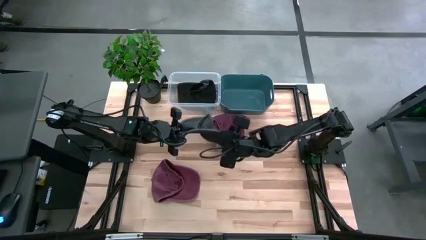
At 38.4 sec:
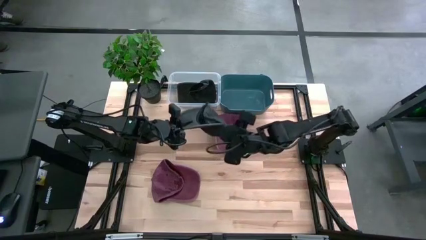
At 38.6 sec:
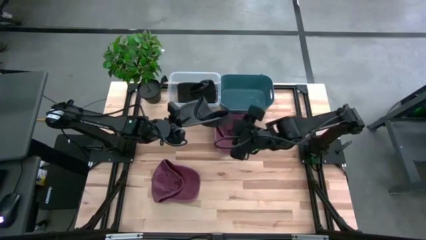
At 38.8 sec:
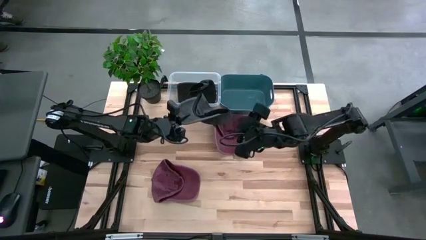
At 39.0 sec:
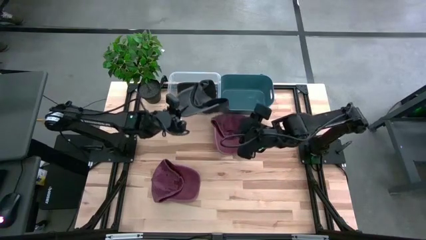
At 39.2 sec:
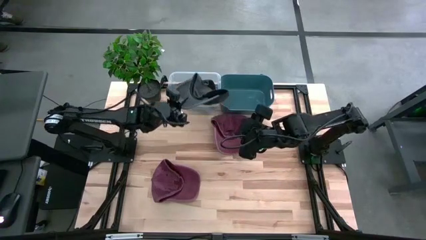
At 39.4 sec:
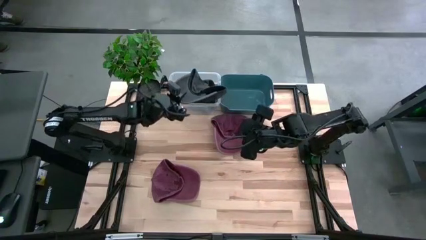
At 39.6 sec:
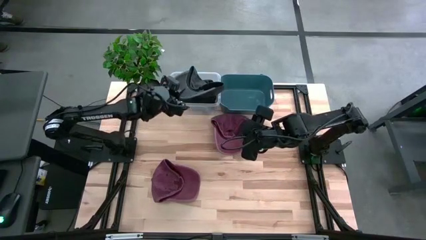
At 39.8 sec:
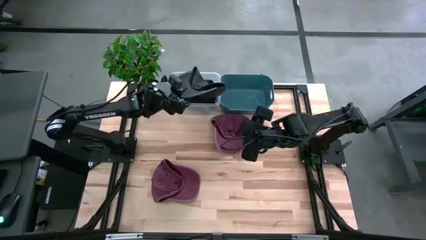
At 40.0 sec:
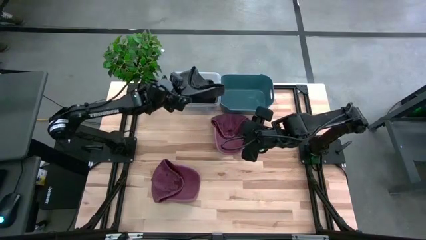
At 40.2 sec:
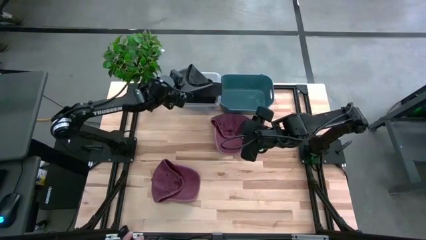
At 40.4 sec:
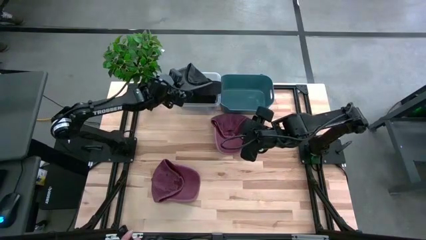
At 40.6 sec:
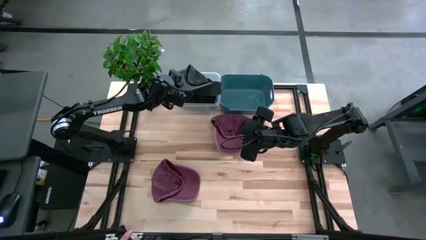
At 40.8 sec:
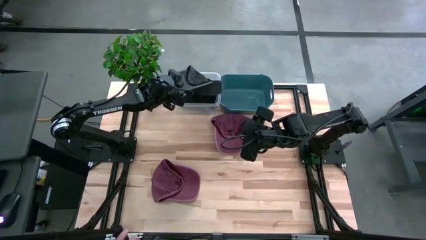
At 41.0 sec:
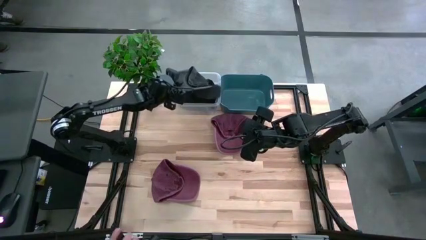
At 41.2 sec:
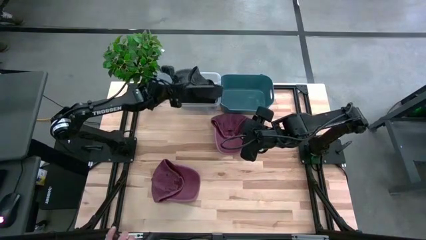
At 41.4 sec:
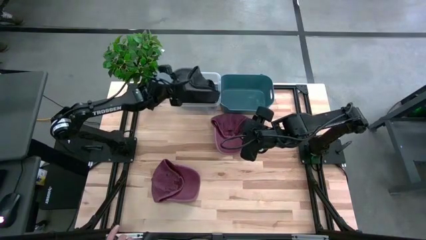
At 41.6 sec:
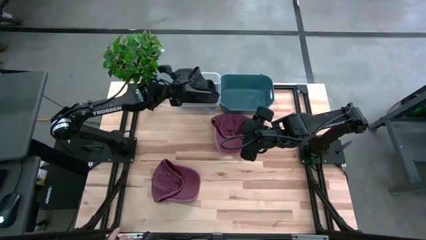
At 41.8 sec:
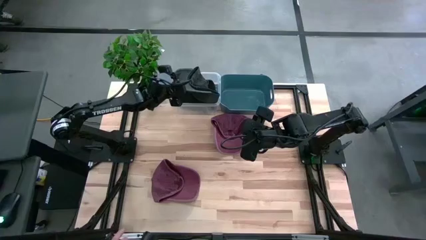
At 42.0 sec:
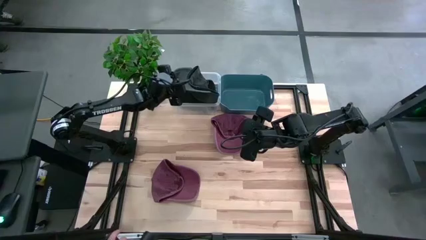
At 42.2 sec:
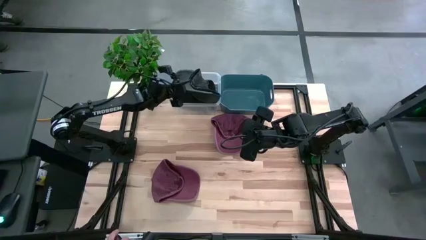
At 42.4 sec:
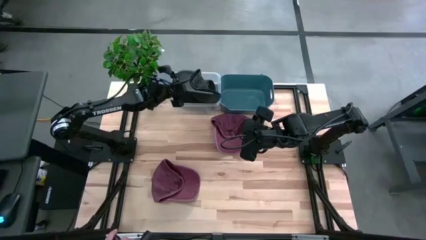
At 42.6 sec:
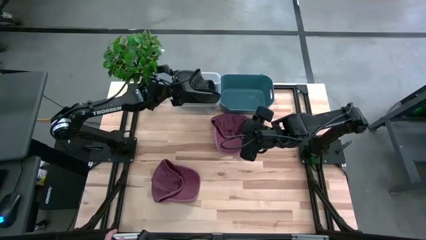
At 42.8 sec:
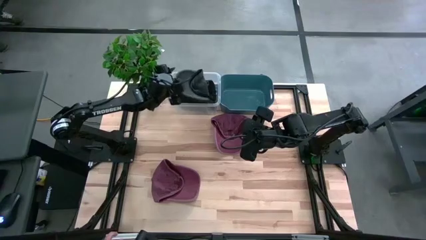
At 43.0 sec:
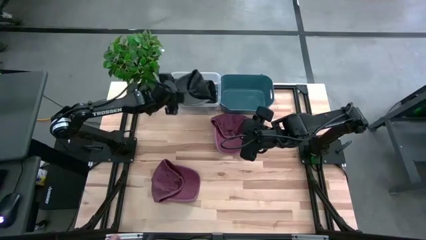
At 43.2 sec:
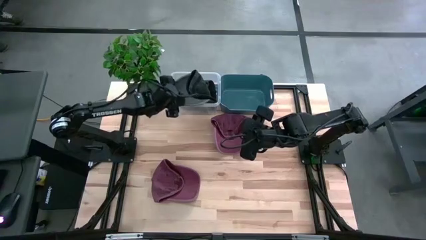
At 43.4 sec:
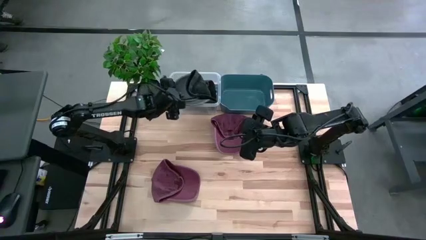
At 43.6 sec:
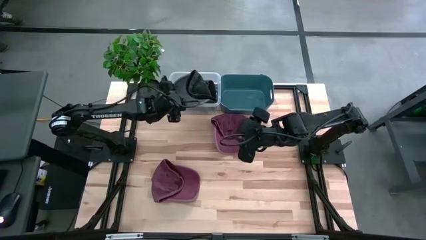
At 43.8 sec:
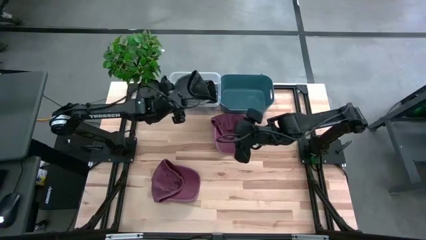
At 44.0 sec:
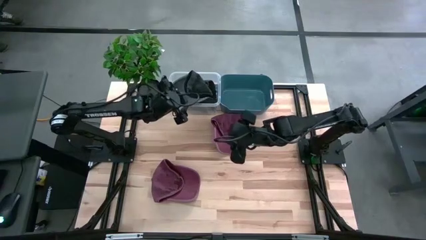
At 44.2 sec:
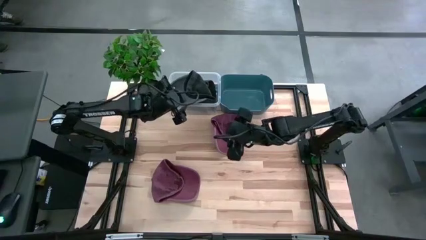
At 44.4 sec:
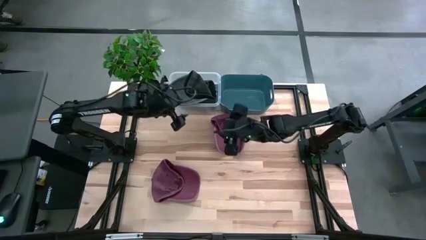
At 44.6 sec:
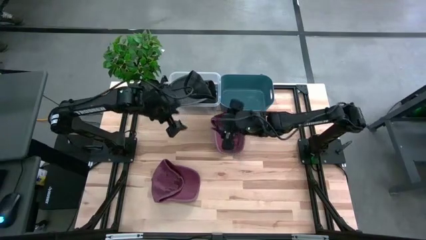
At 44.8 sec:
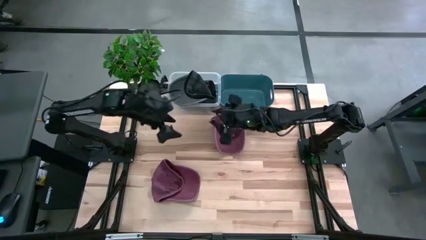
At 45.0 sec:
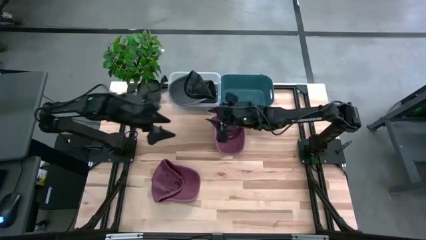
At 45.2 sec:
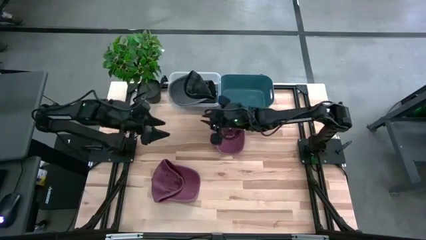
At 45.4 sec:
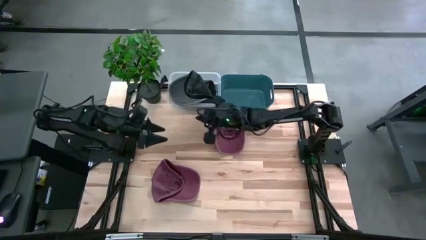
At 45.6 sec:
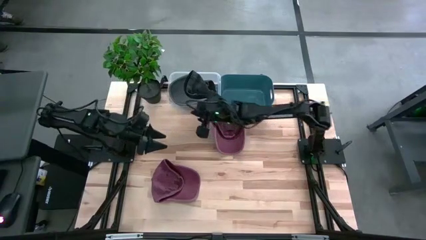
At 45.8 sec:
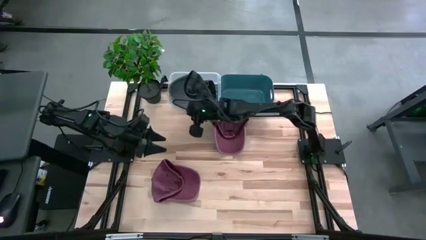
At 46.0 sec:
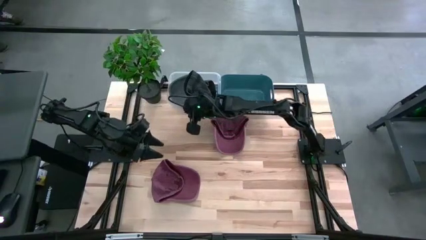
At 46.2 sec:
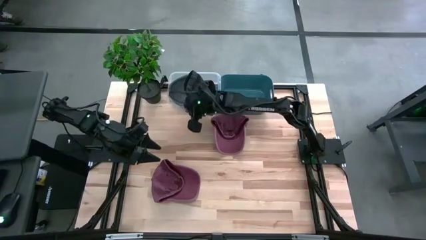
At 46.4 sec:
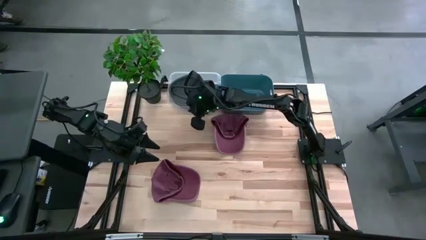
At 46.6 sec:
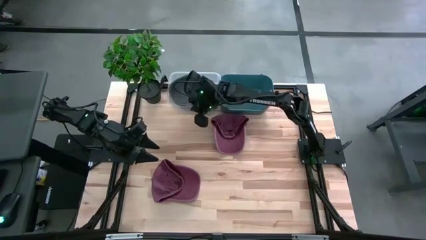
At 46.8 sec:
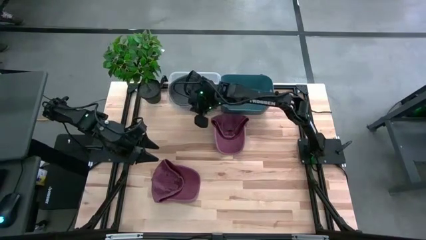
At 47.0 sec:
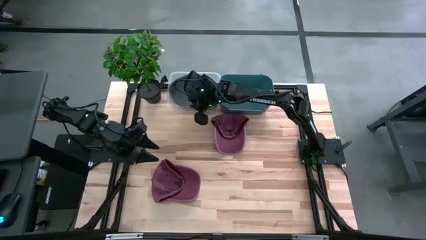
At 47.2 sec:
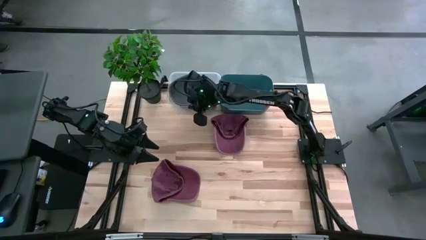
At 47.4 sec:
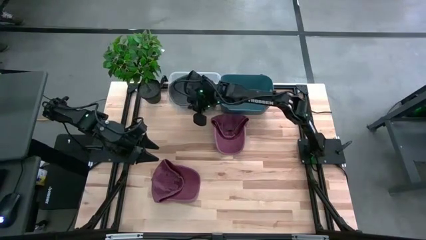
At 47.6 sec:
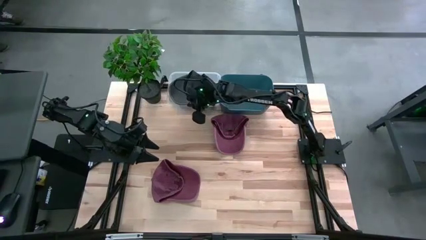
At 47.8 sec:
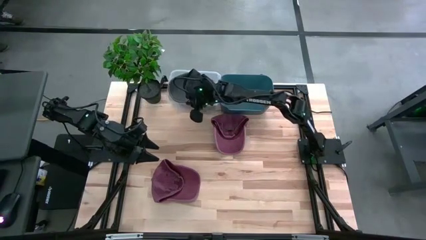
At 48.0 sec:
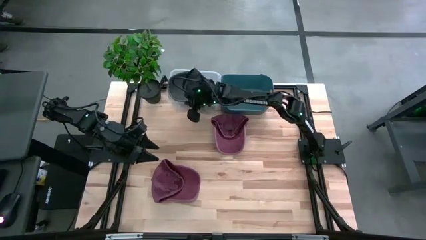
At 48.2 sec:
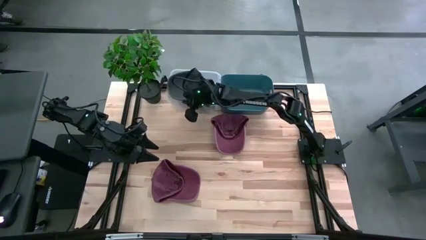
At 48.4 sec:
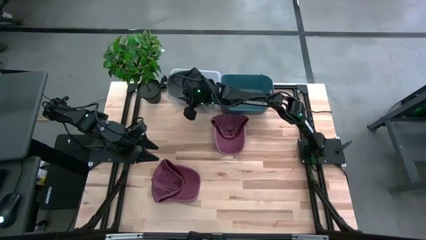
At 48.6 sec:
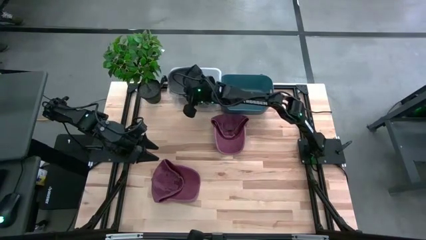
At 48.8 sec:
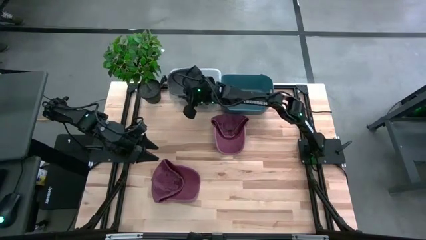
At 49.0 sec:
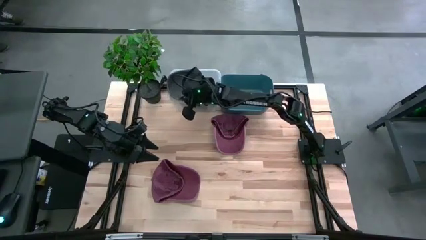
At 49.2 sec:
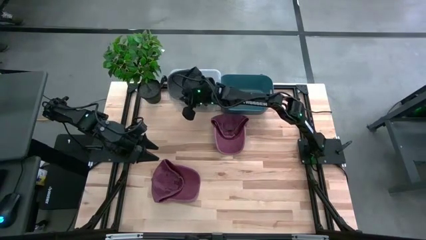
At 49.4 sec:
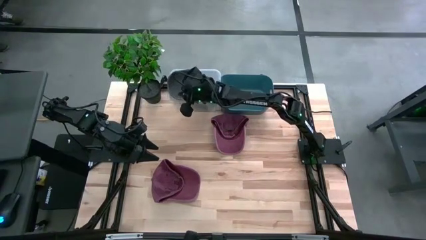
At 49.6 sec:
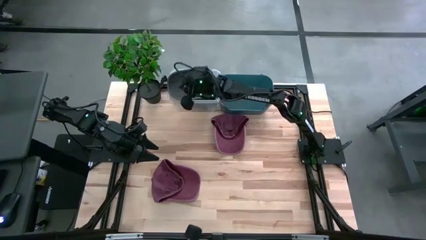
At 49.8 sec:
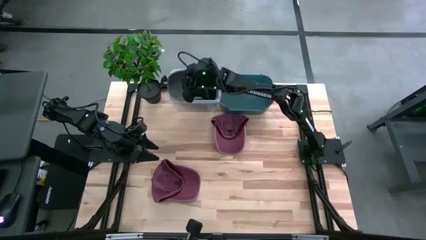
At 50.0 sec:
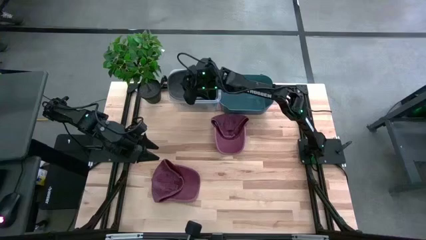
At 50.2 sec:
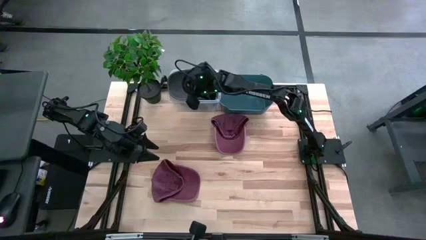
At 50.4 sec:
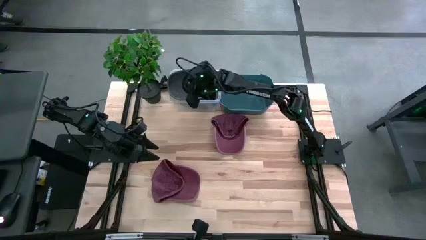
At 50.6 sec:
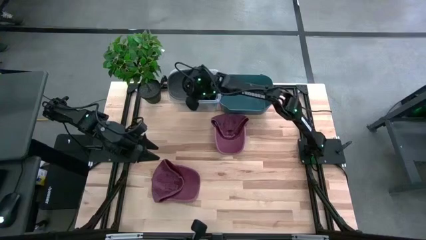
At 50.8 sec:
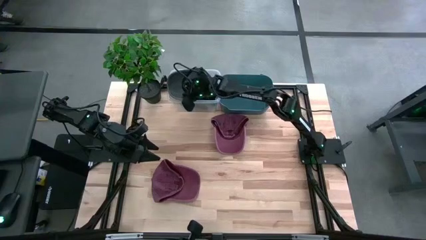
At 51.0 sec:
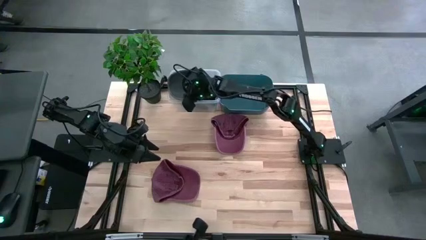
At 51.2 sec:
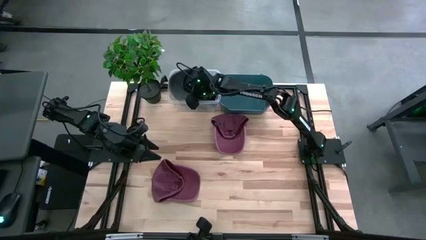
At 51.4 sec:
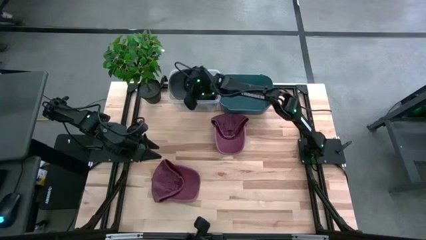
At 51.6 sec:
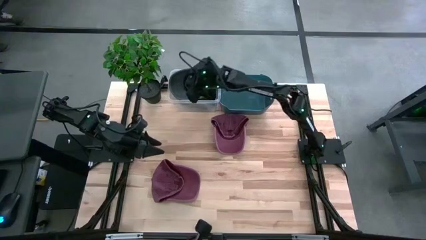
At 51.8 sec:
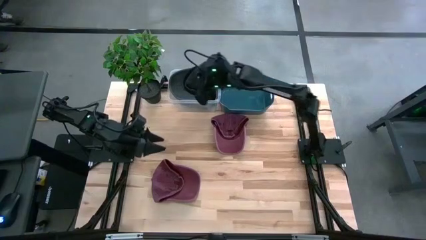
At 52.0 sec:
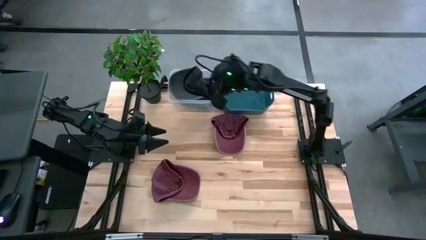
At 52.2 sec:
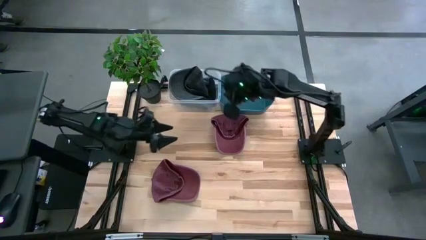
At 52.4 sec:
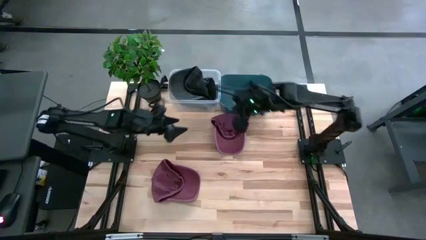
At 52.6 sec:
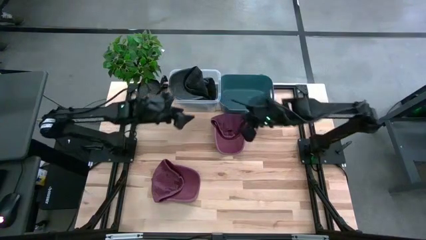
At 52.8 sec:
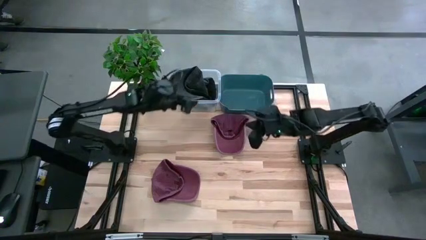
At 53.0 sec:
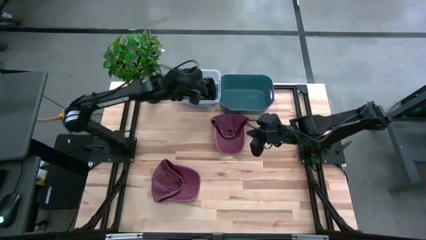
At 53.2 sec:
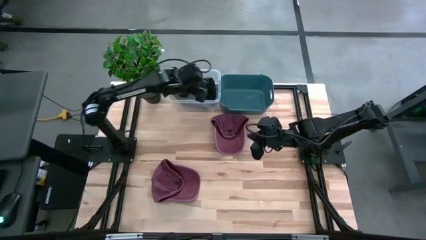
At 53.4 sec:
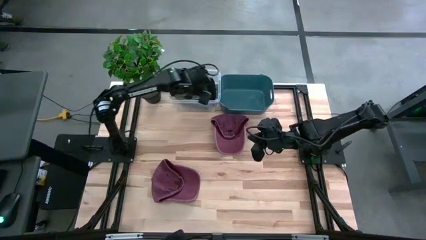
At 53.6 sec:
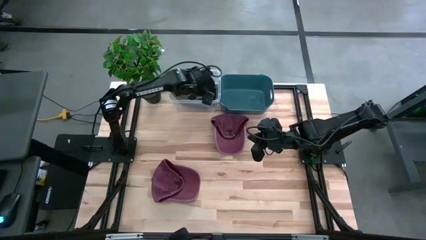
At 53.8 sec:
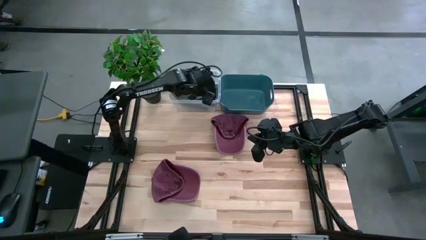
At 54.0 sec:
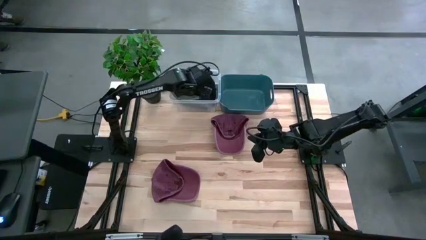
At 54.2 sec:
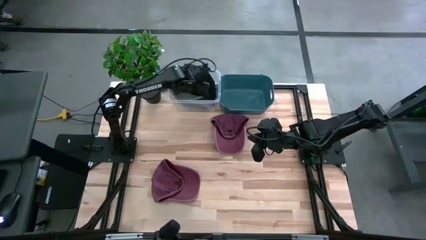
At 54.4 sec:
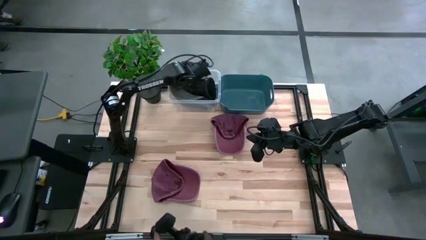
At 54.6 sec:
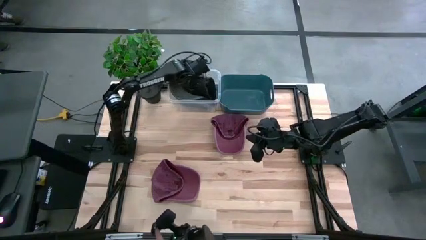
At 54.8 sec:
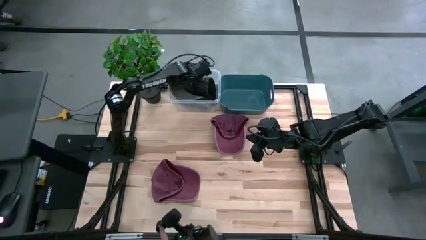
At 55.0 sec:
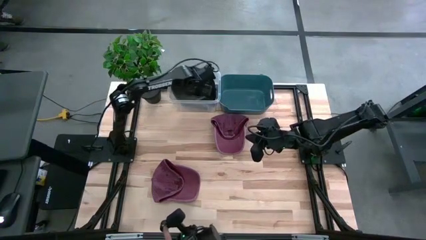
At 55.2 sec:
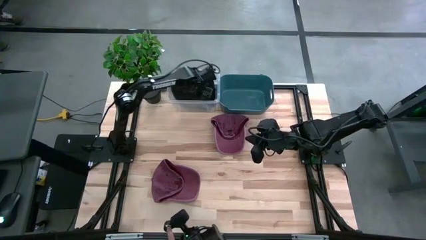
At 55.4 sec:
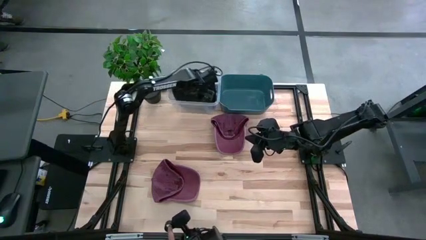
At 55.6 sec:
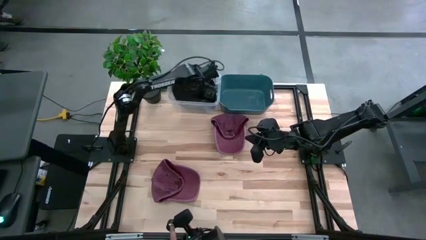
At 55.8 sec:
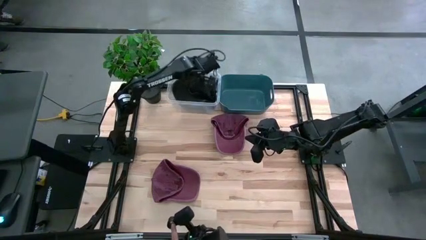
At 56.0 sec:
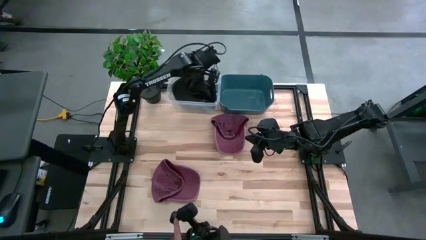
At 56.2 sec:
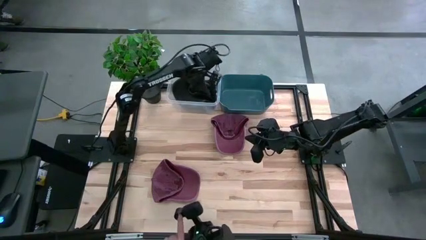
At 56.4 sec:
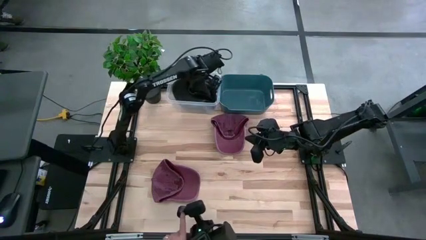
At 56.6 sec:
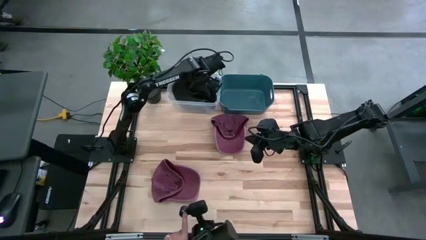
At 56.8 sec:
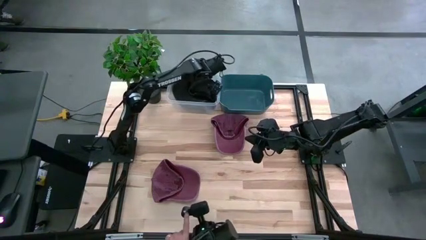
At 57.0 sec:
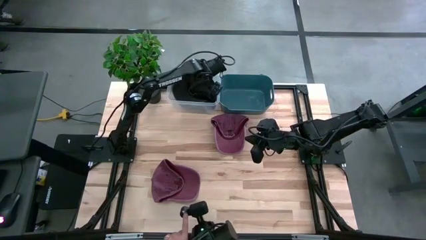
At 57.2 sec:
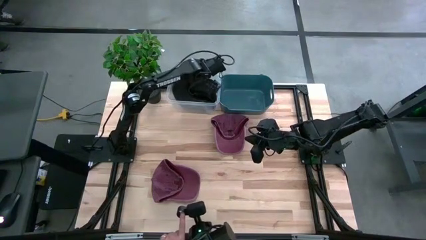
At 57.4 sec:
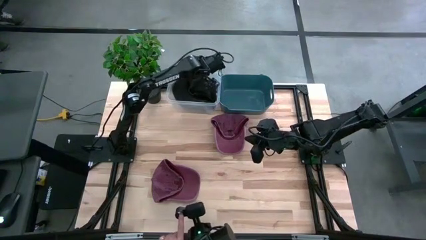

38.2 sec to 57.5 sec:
Task: Pick & Place hat
Put the black cap into the transparent bin
